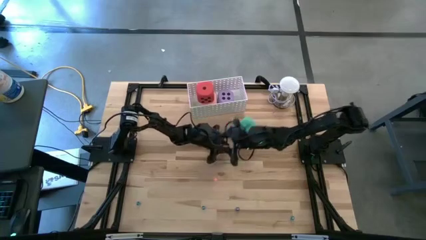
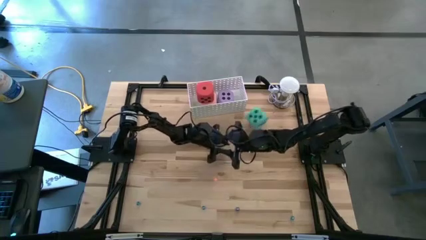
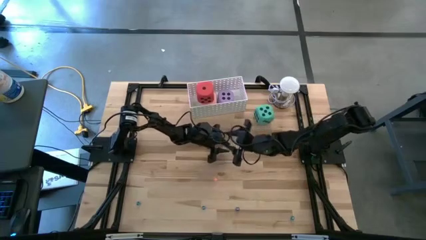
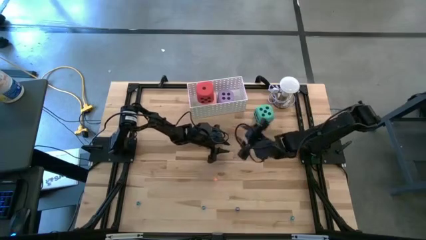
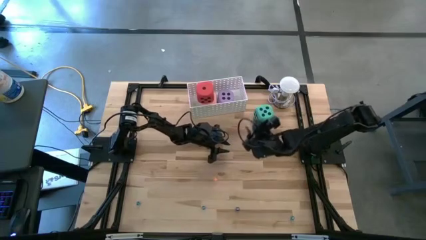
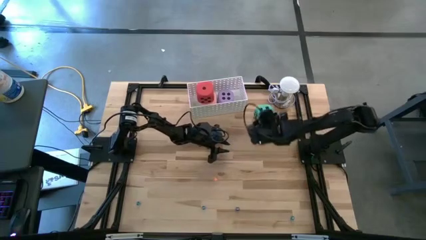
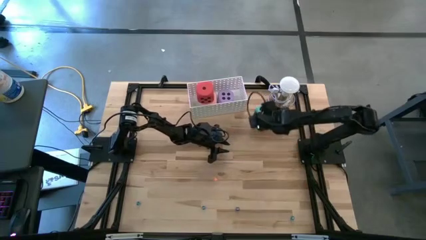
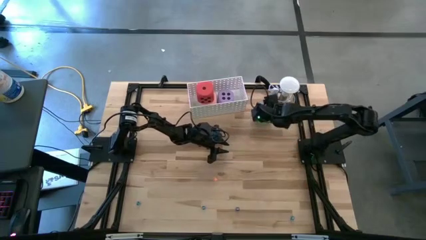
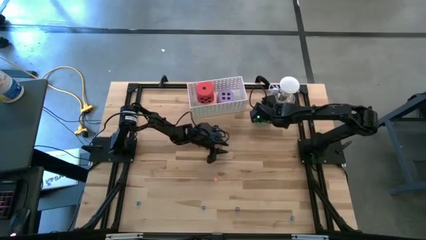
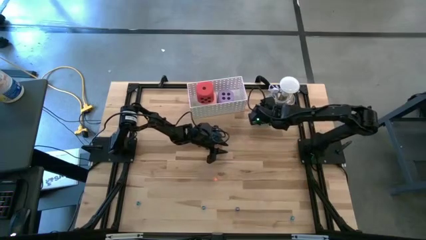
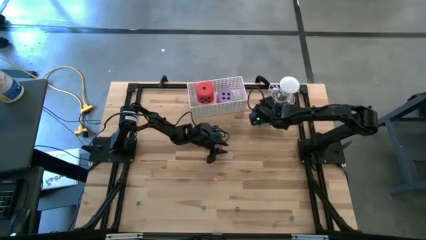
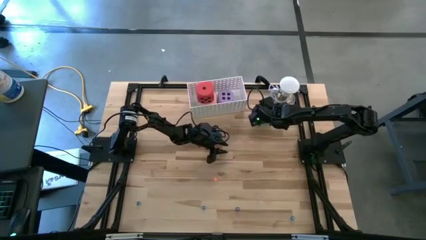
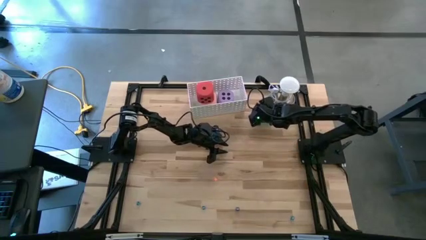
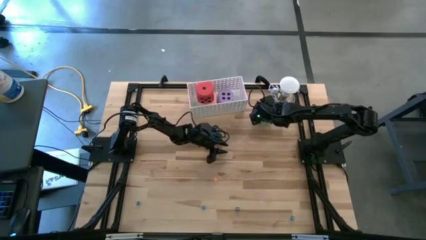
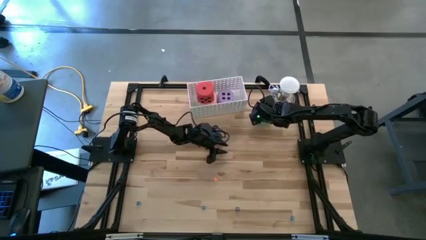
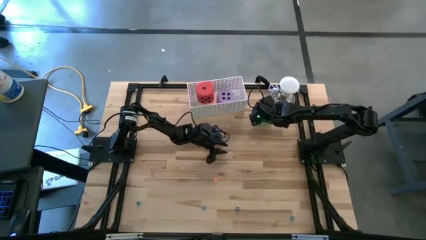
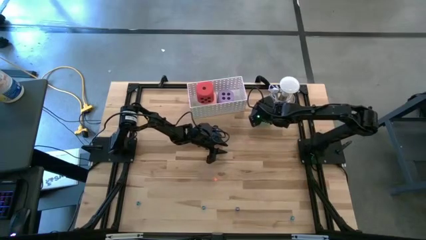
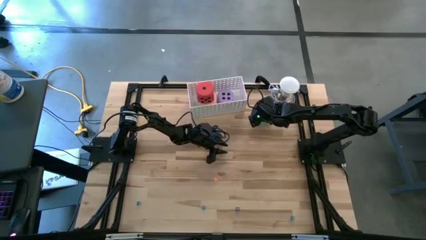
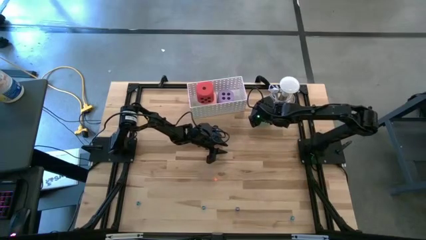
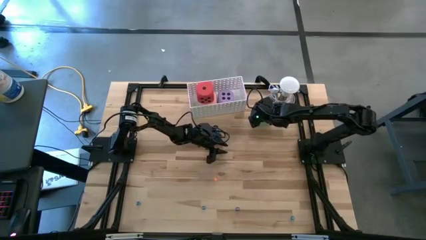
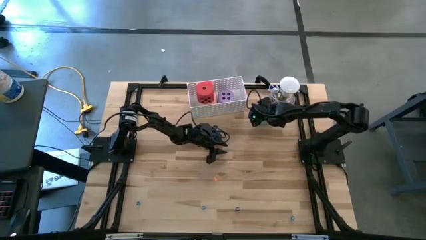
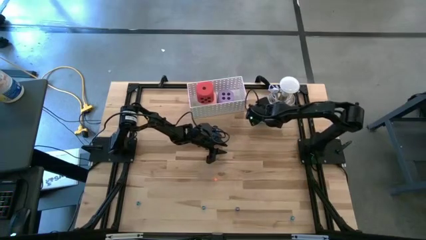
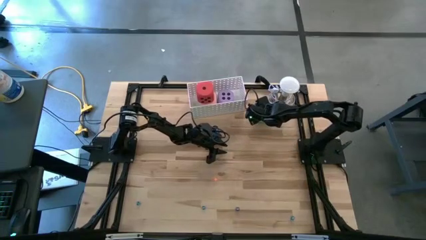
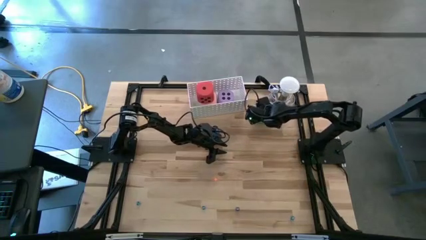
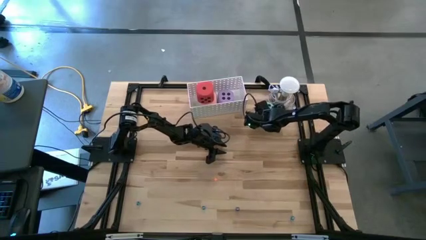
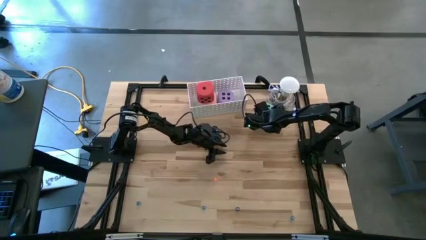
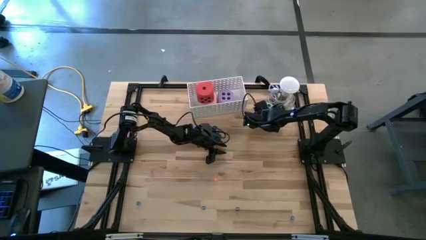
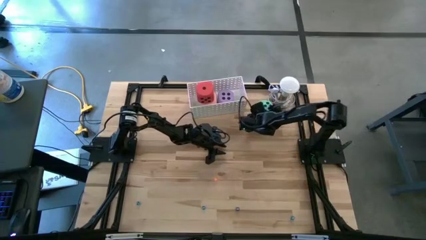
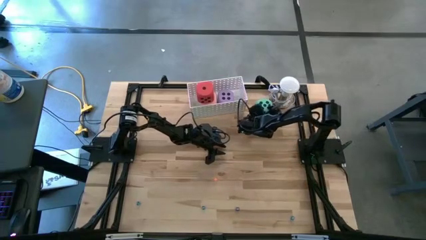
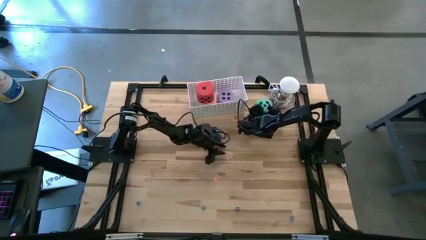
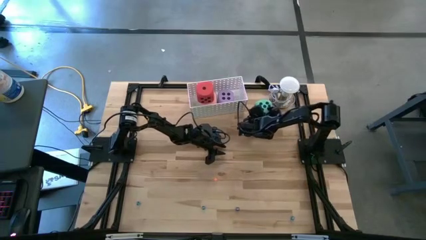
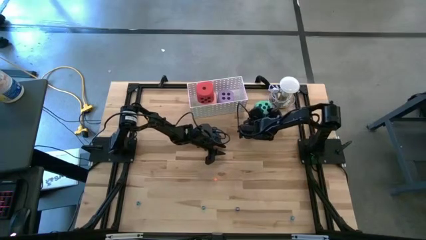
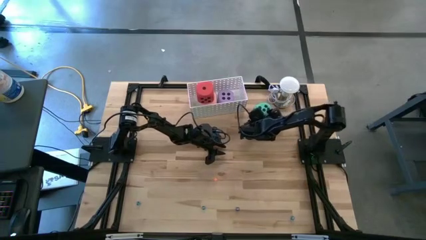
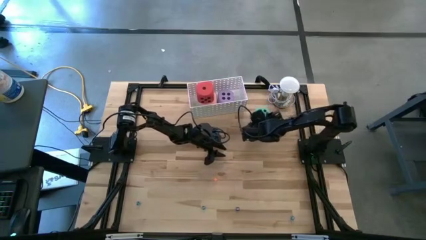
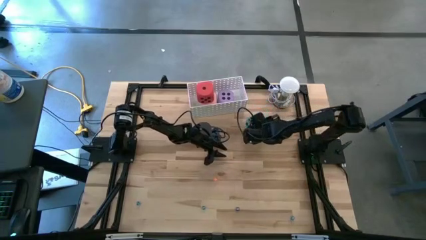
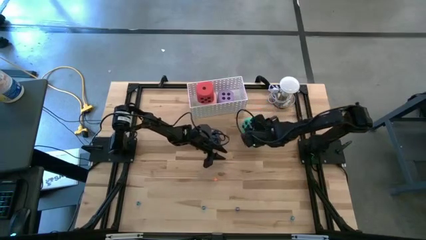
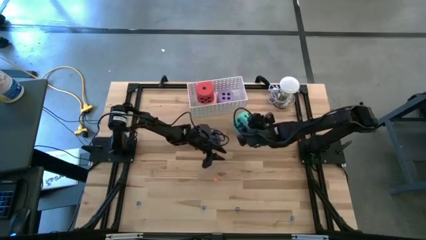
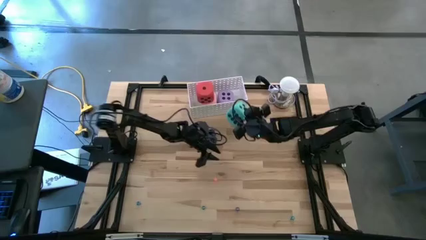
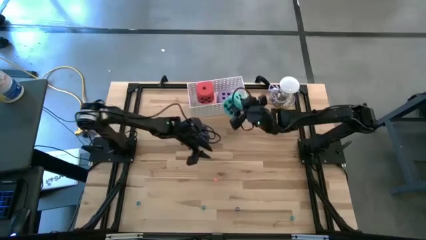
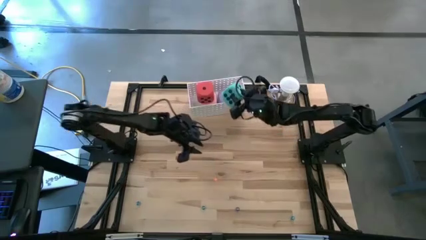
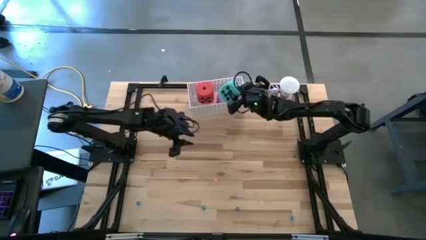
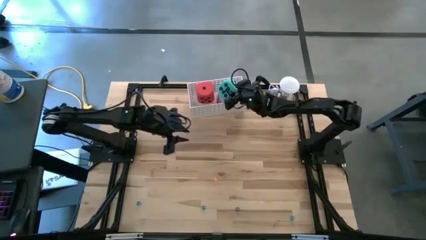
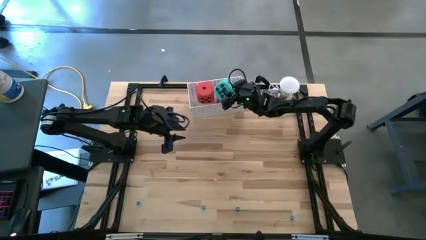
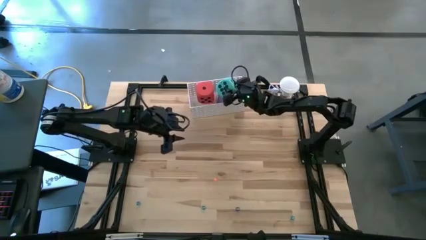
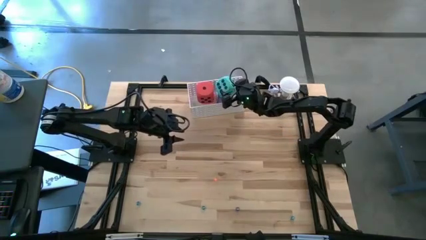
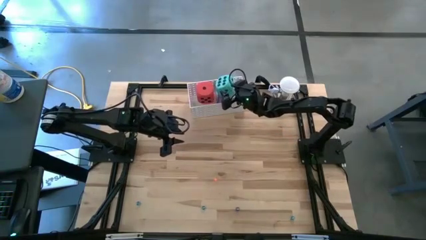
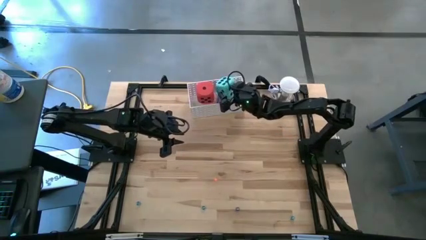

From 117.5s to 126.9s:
Task: Pick & Place Dice
Put the large blue dice into the white bin

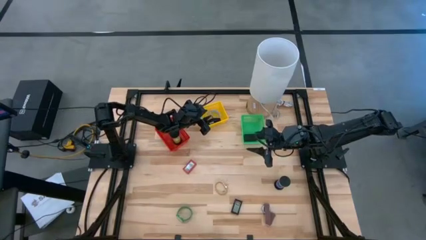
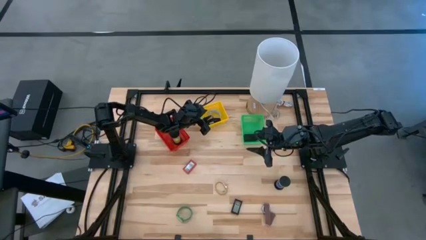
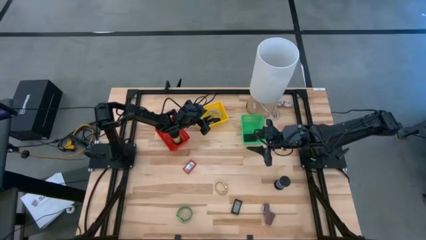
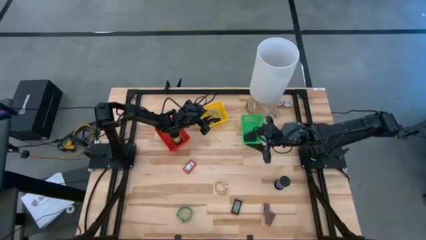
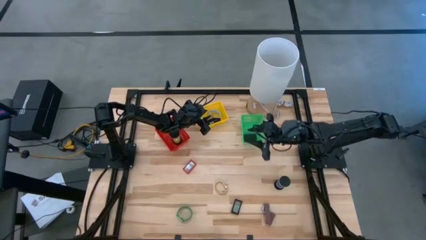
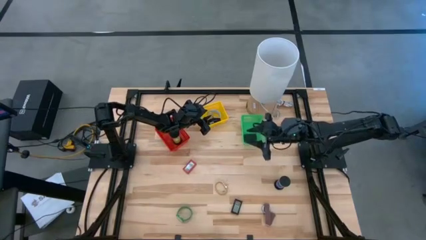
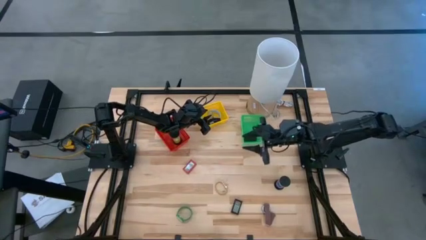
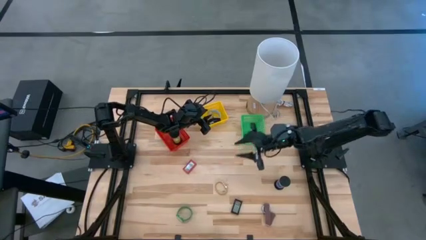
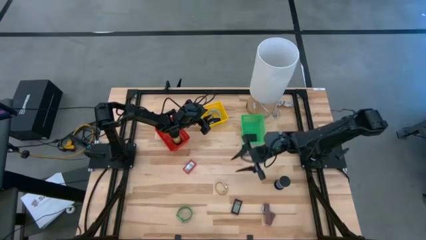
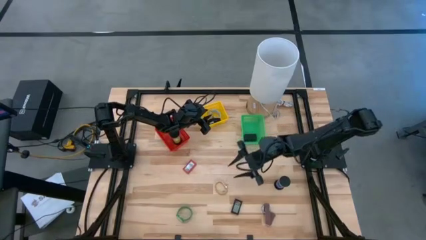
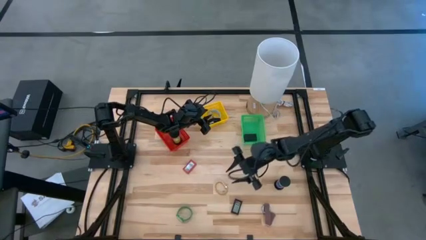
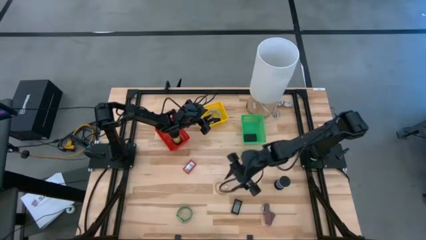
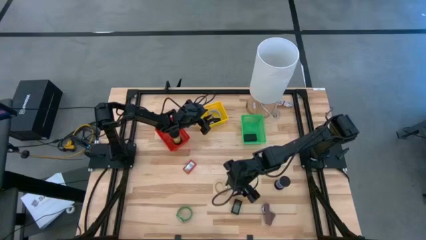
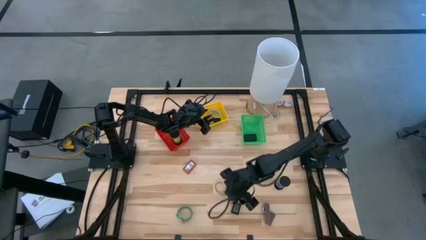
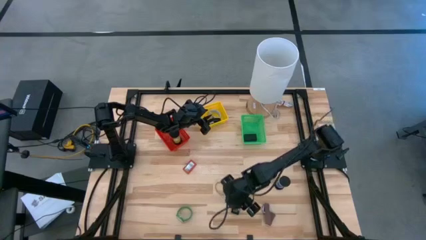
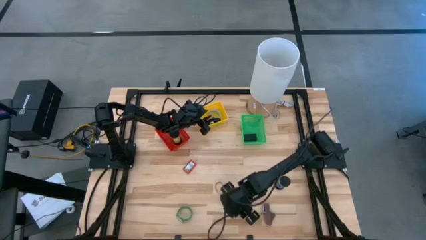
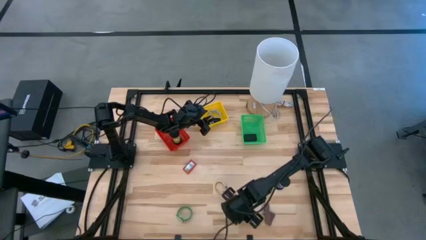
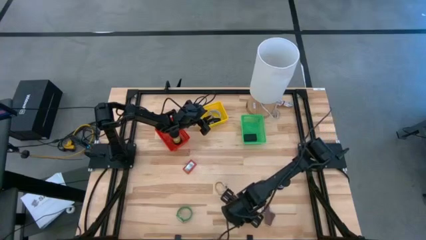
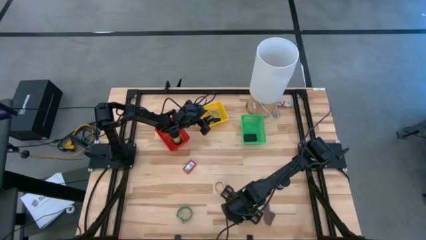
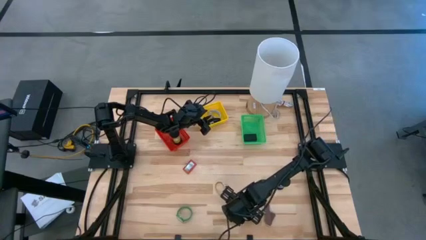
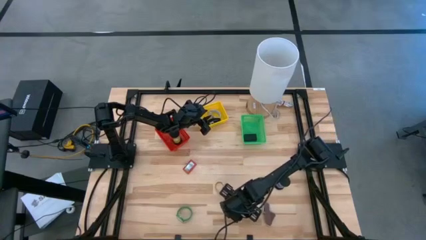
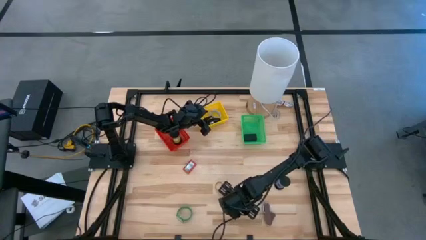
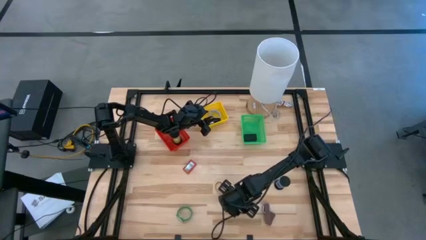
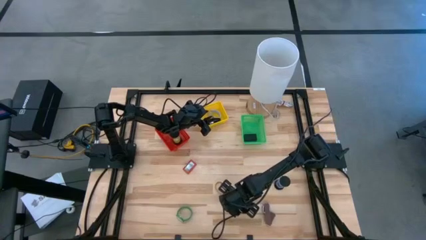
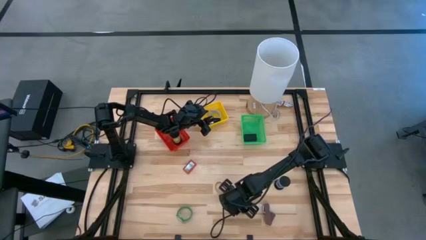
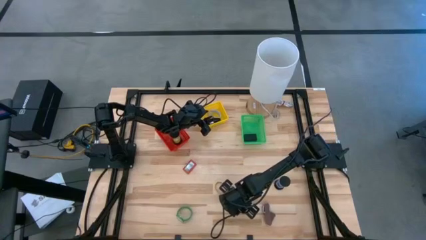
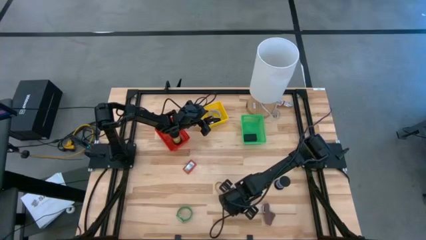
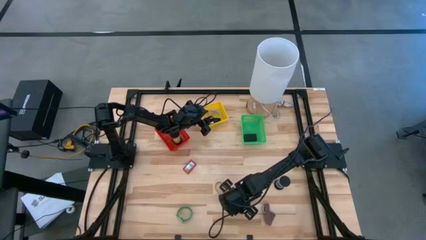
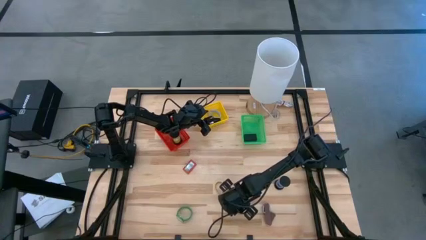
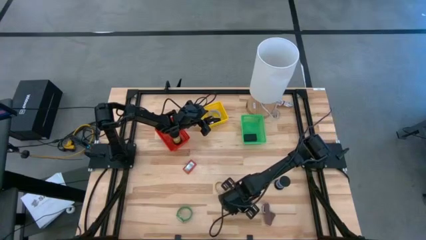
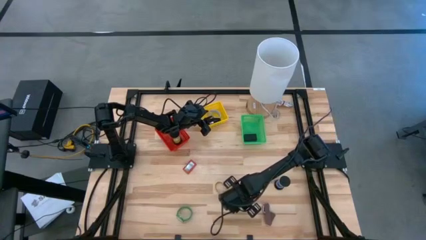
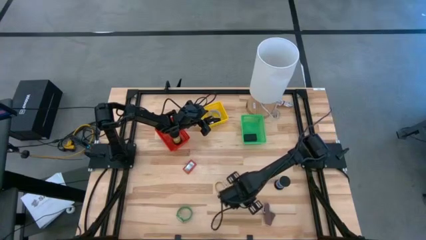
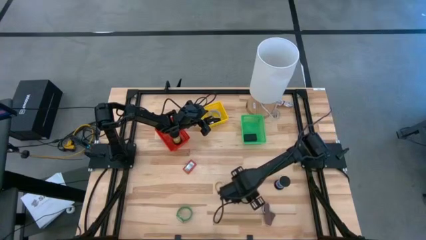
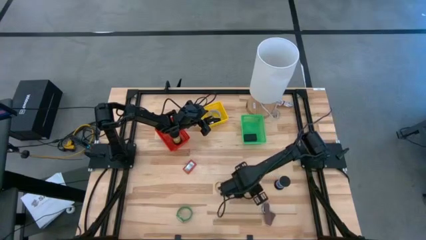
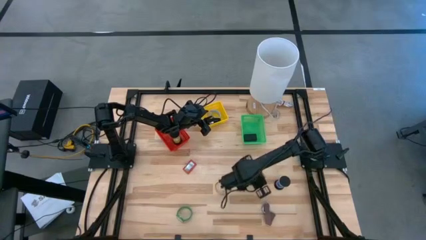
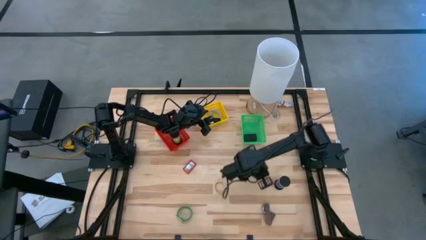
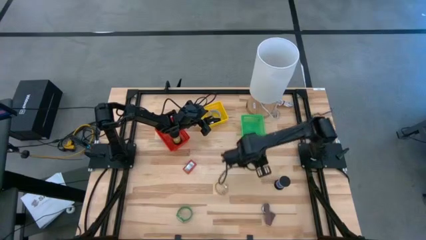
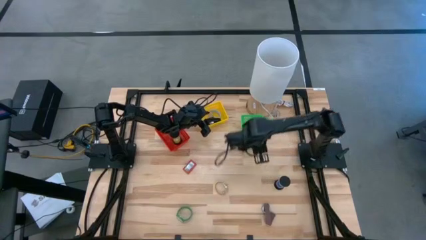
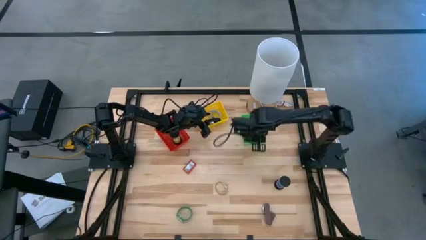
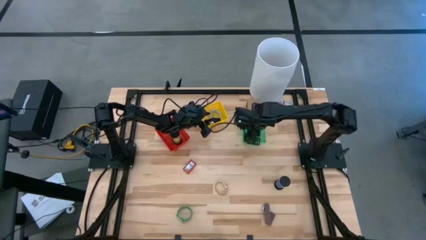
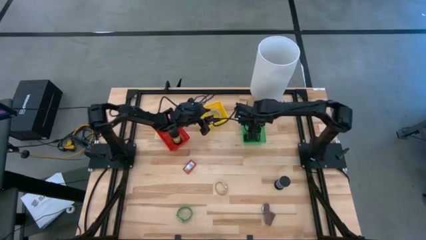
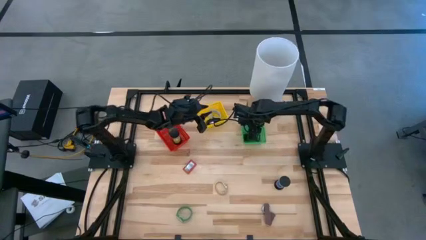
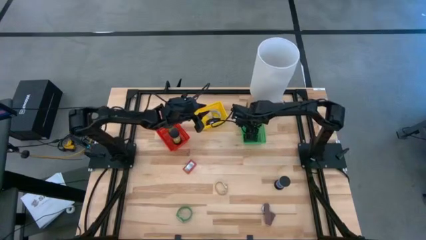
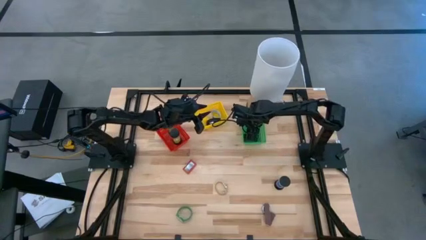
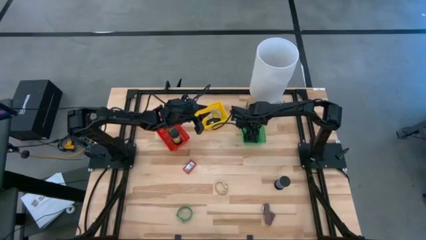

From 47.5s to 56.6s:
Task: Pick & Place Office items
Put the black digital clock into the green basket
